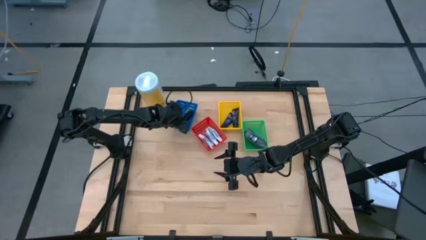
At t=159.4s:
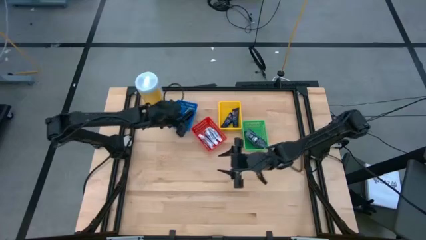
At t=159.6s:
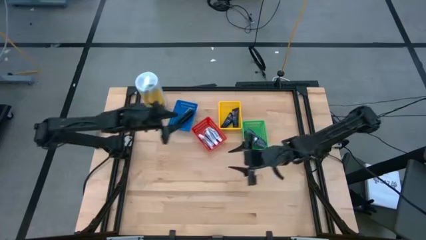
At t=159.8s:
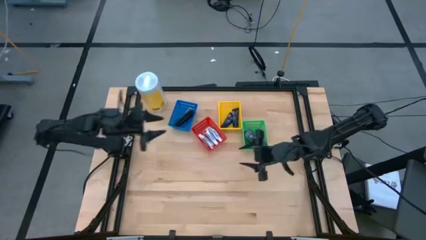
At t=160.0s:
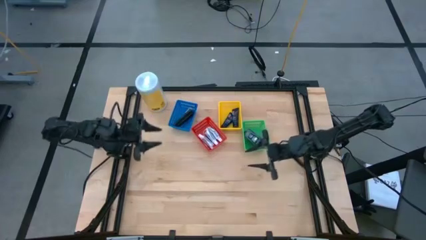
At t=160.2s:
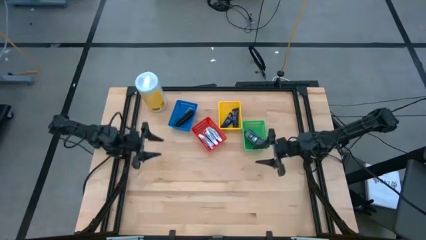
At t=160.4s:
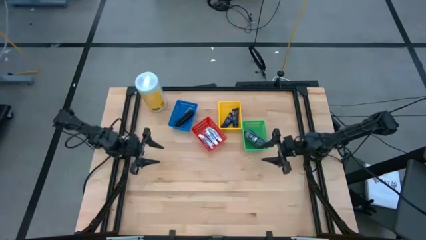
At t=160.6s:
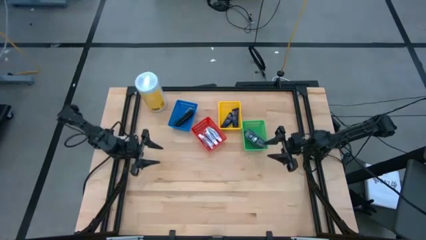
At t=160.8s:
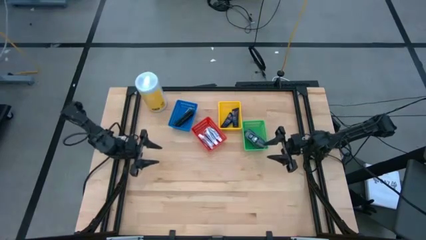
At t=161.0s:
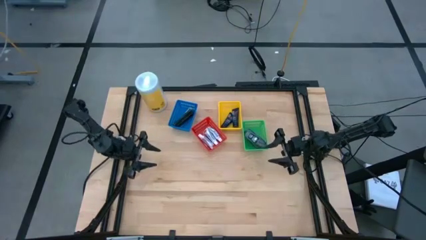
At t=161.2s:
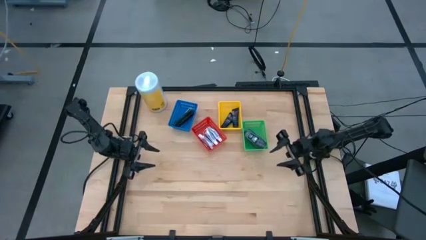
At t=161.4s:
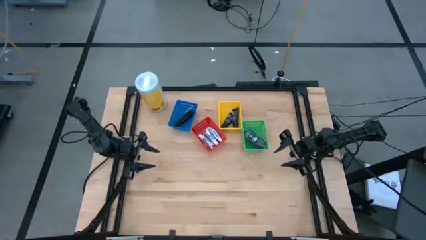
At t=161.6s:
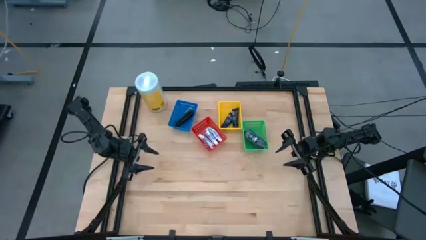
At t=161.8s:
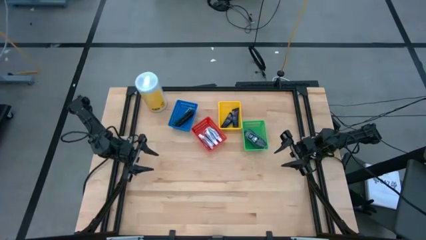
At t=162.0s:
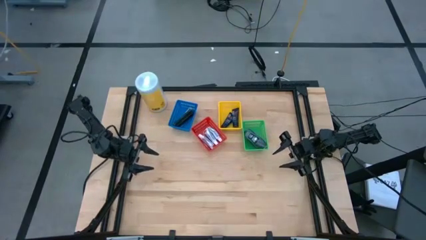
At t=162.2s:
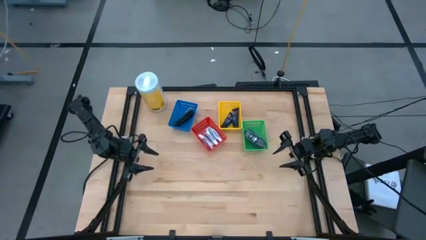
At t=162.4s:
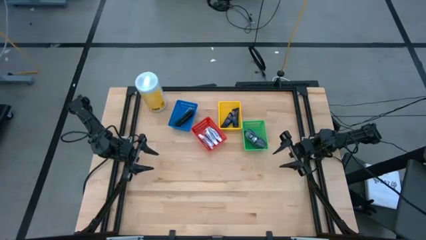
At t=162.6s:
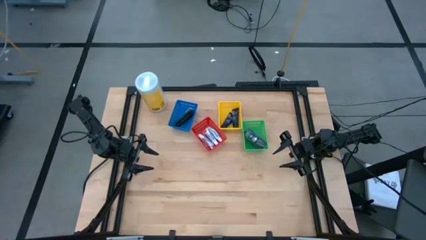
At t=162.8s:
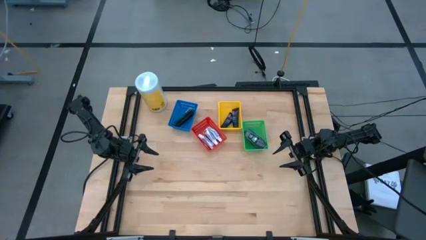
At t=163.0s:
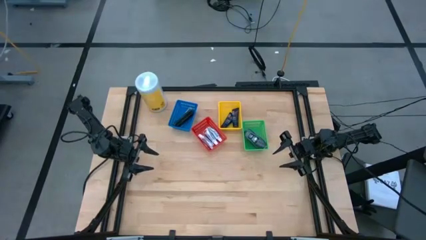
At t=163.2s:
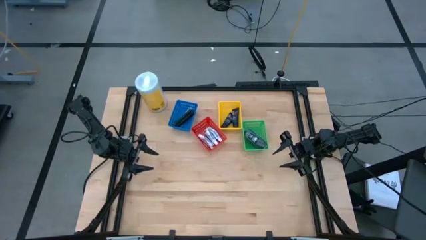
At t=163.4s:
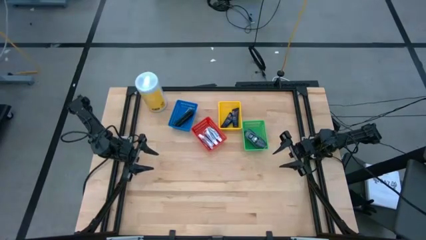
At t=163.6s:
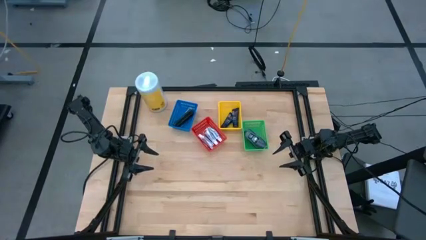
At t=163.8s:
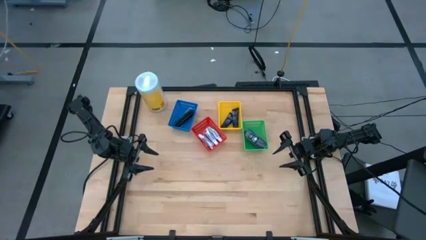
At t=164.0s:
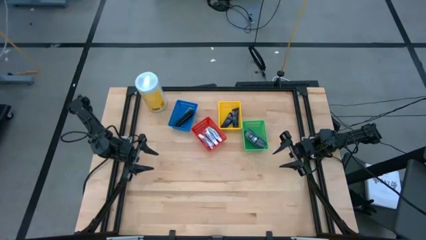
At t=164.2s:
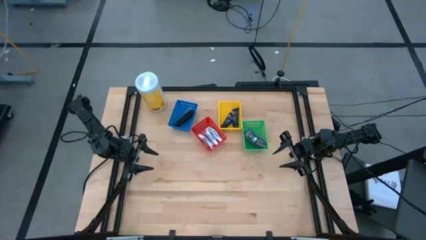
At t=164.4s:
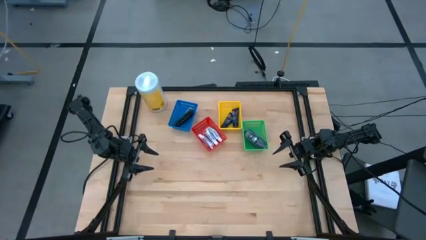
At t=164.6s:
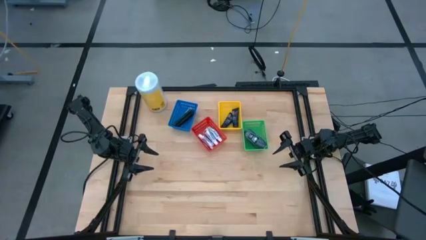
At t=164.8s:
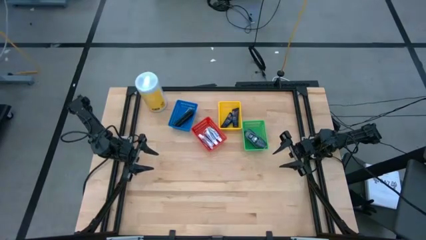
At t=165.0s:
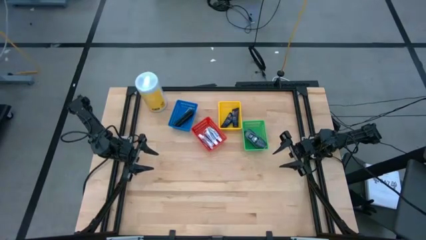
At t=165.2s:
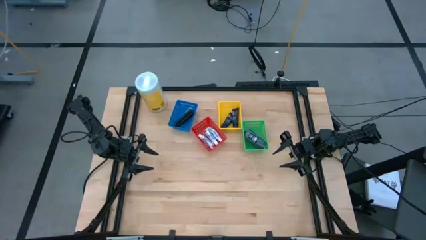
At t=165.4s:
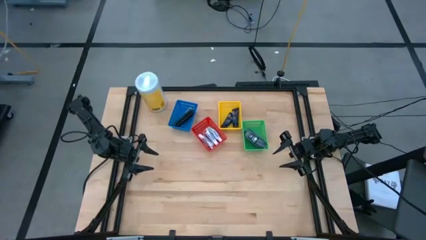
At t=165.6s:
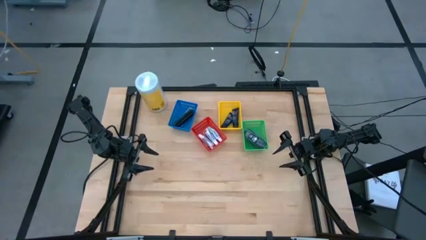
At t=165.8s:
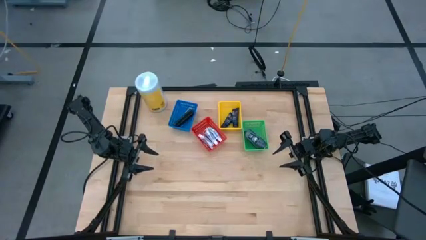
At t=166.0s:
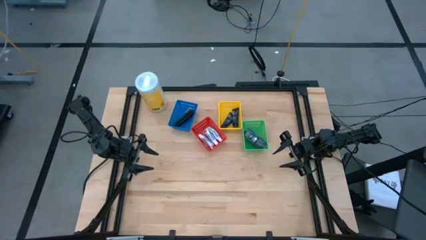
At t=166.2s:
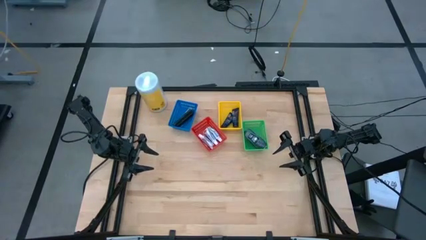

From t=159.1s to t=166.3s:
Task: Pick & Place Travel size toiletries
Return to Home Position
